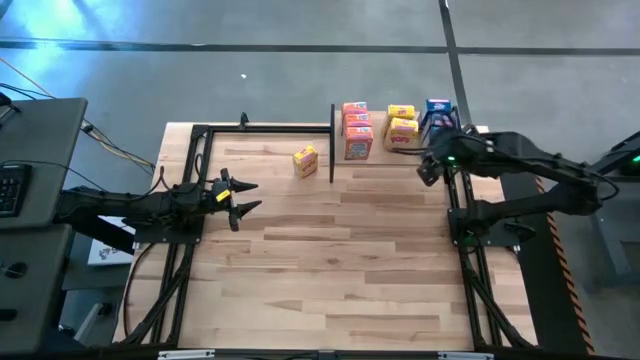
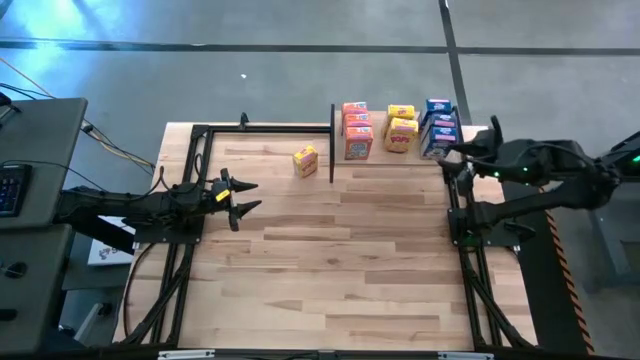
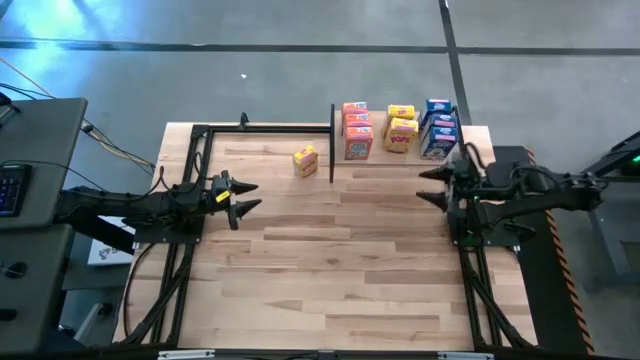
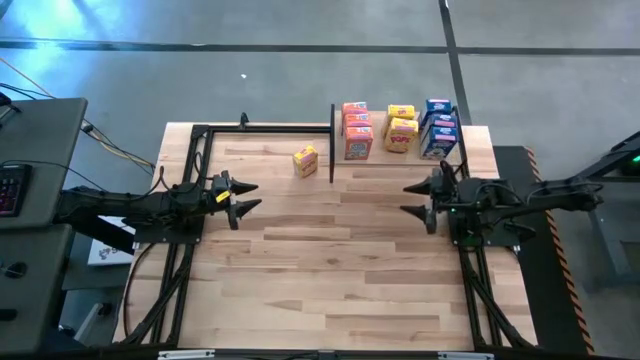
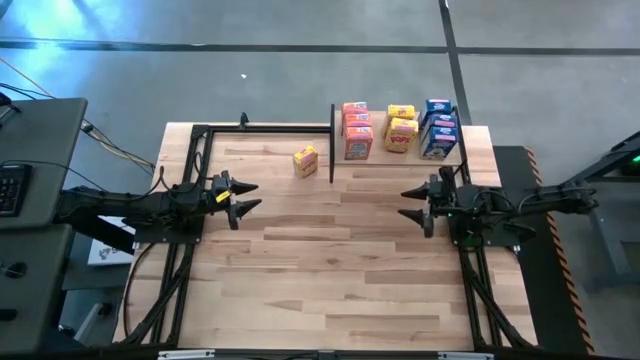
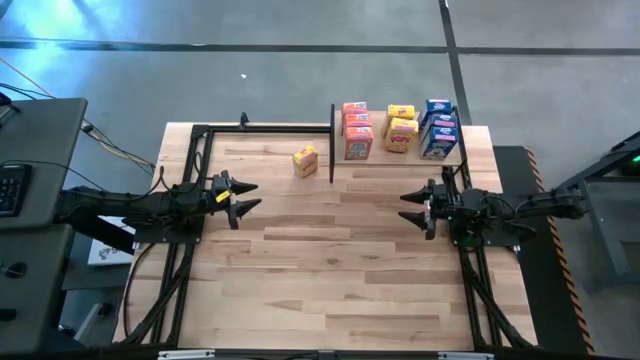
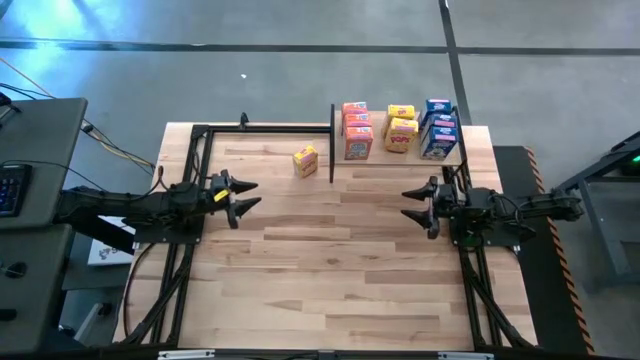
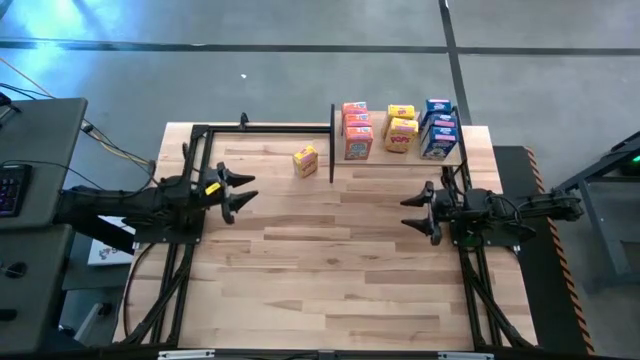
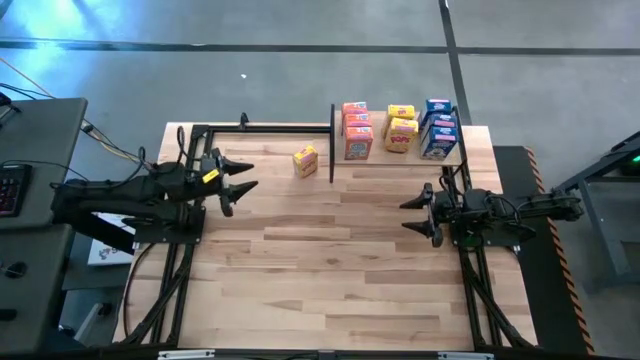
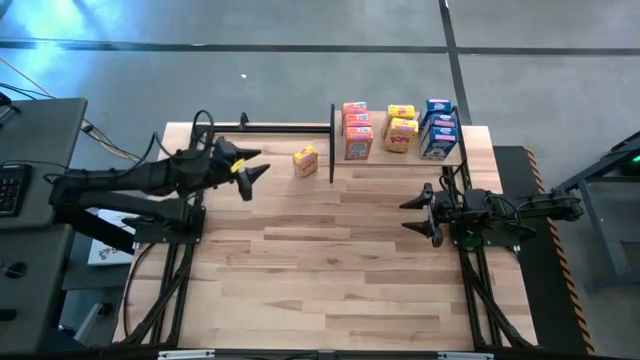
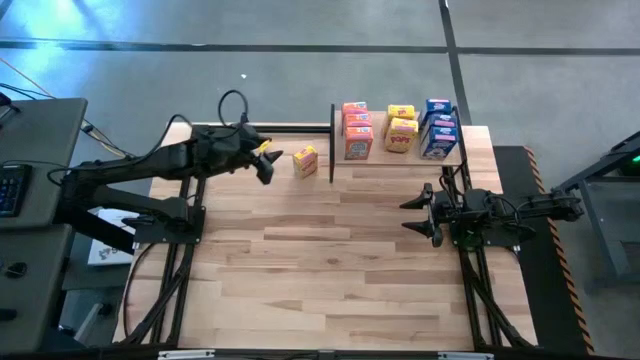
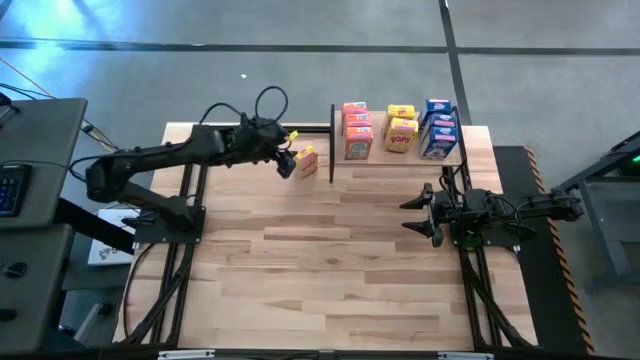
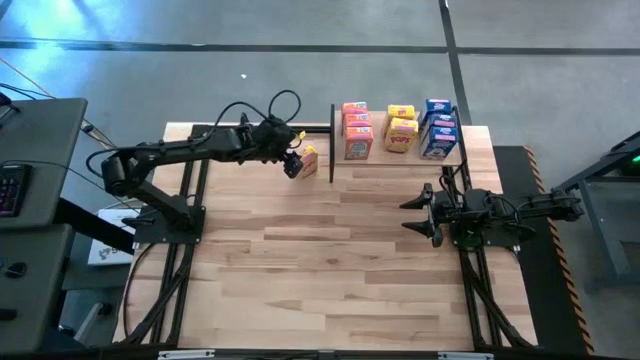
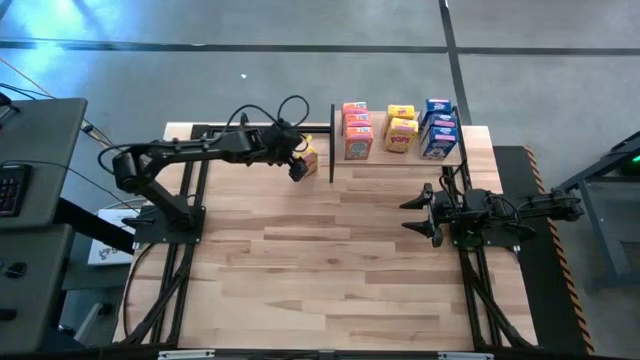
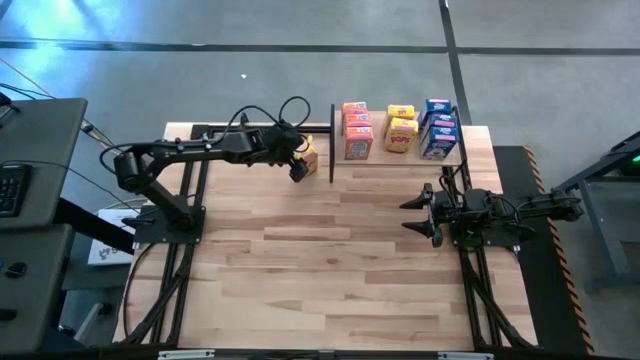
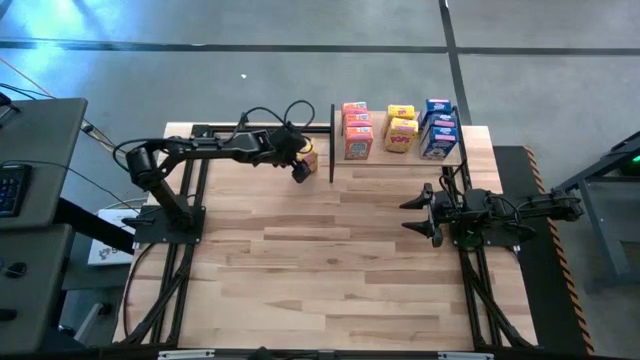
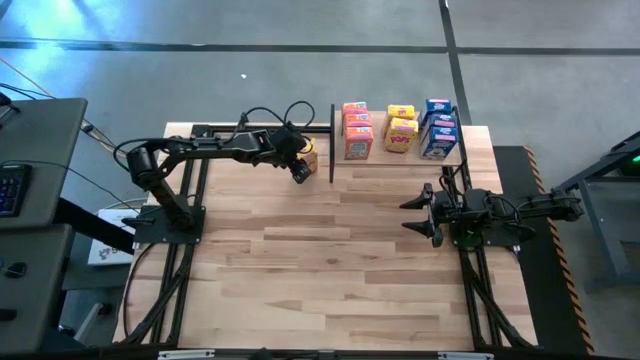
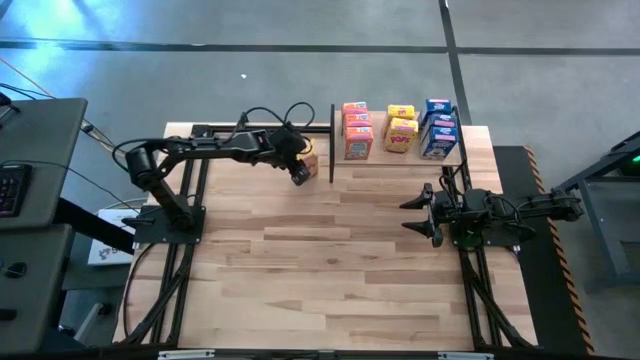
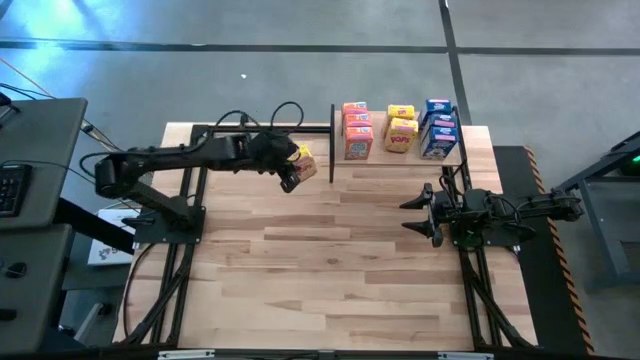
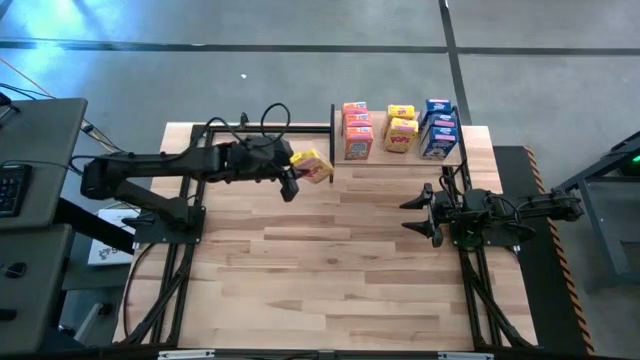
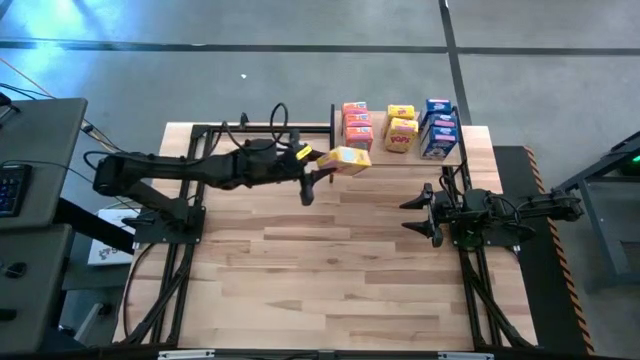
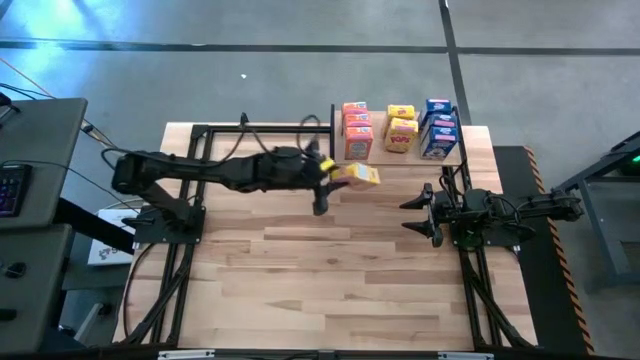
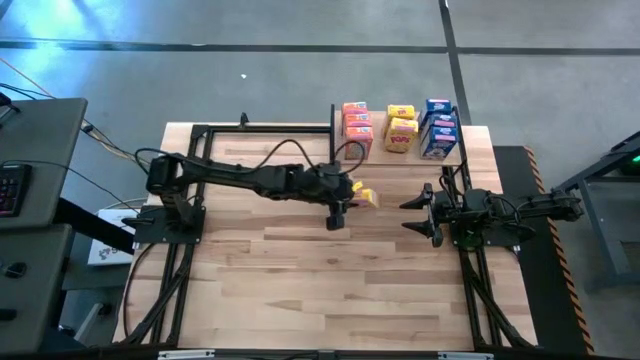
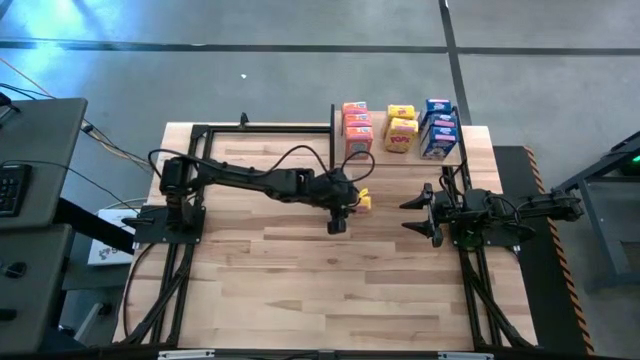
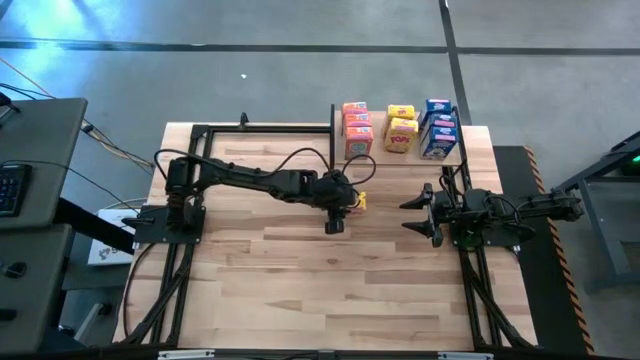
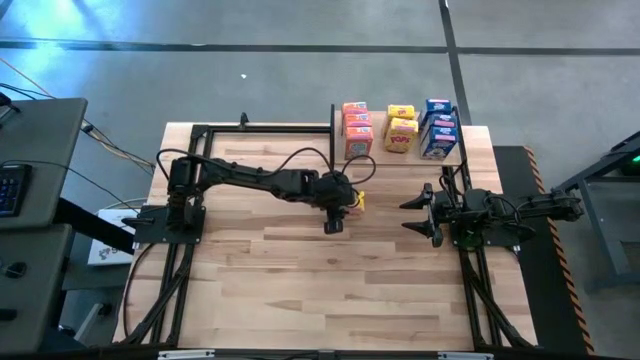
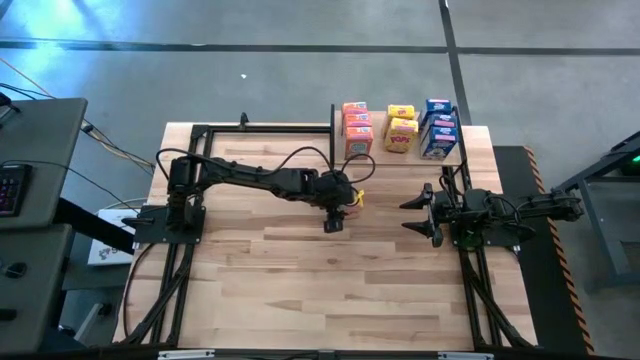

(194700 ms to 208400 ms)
Task: Stack cereal on shelf
Put the yellow cereal box on the shelf aligned with the other yellow cereal boxes
